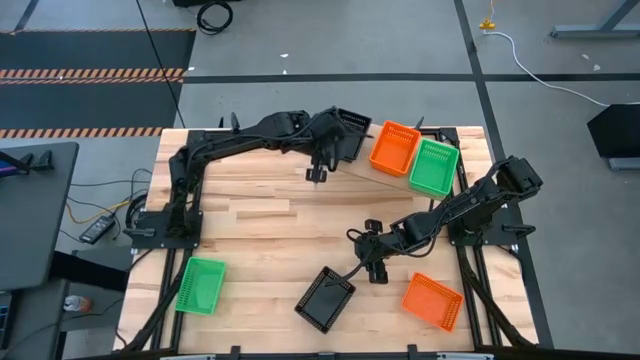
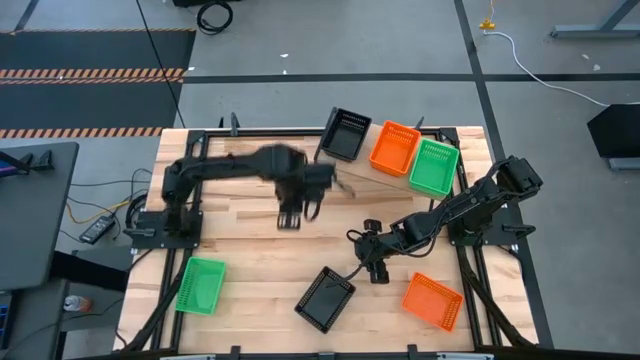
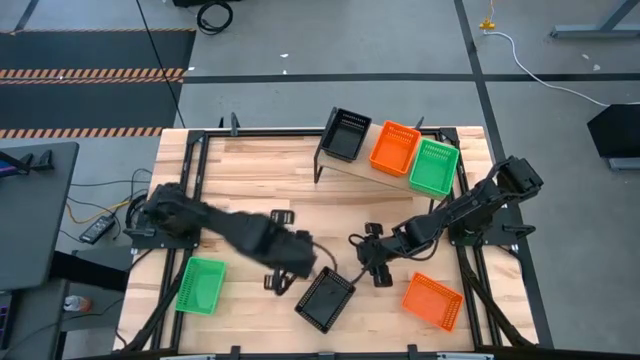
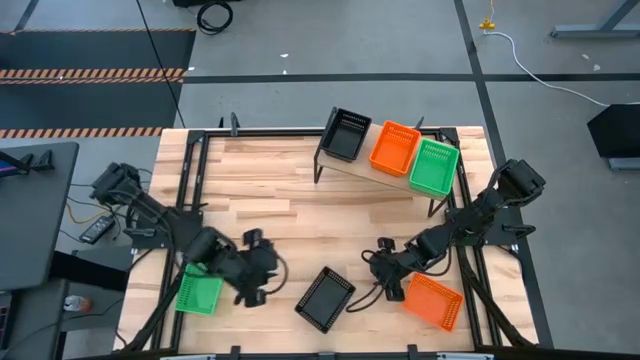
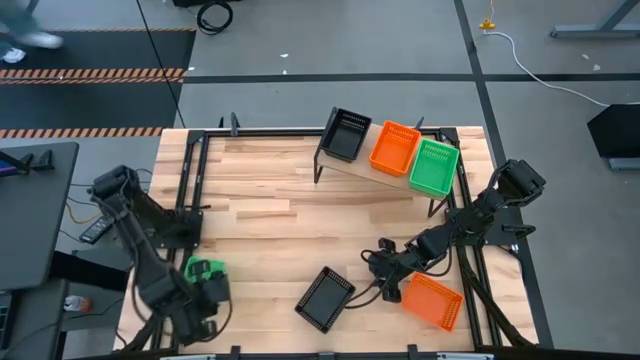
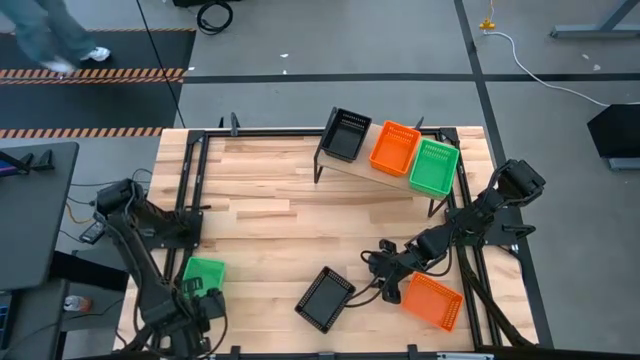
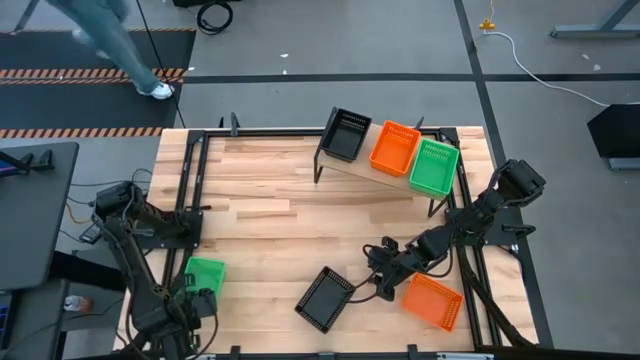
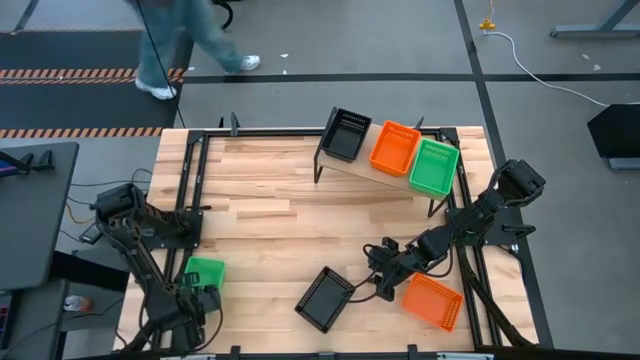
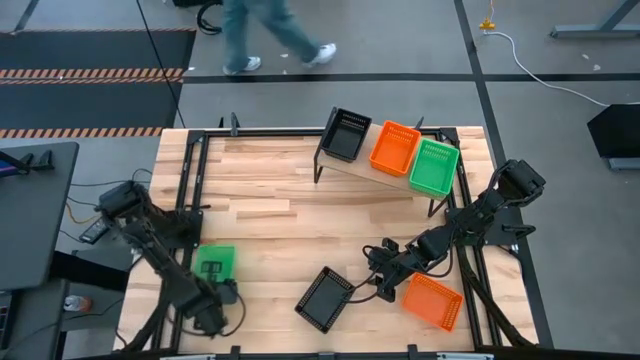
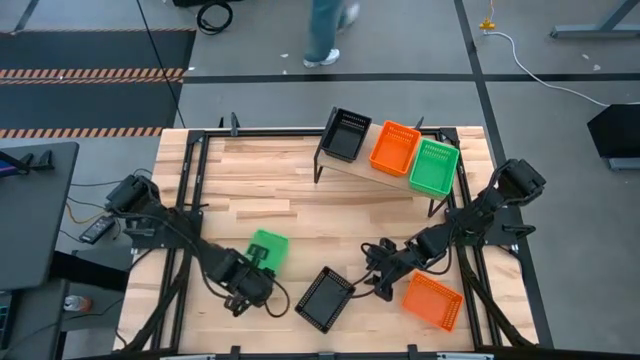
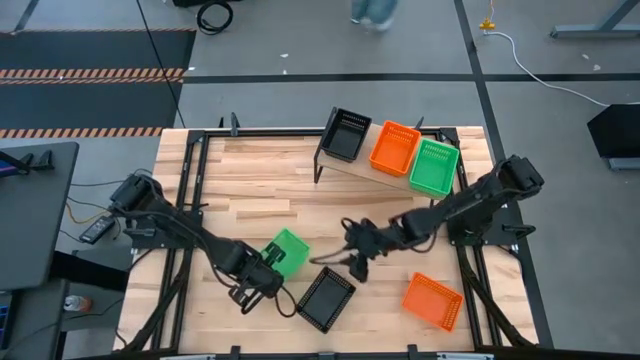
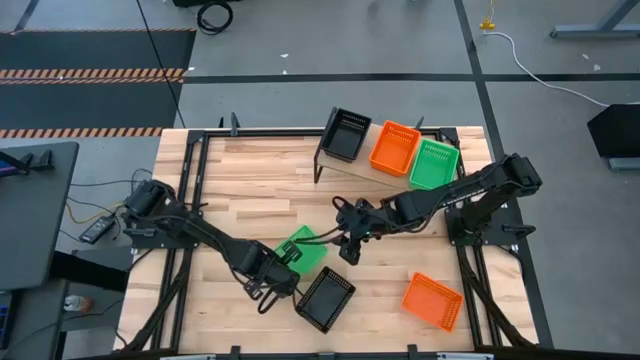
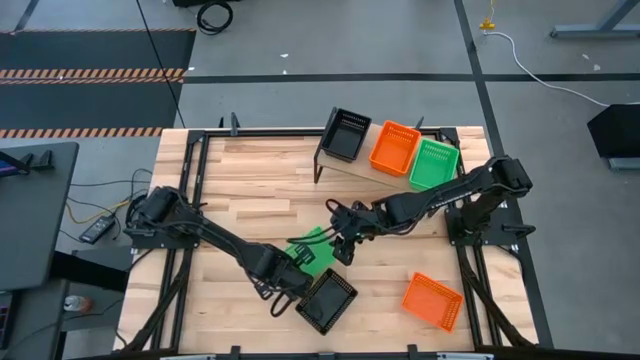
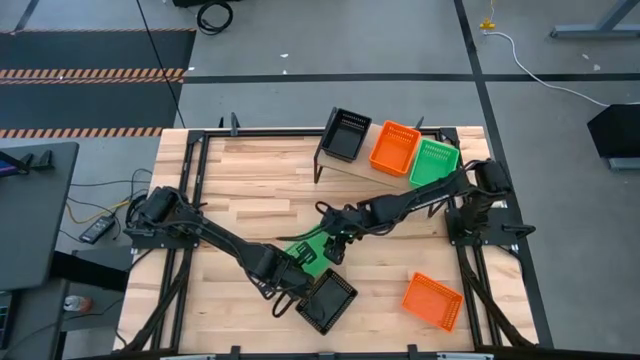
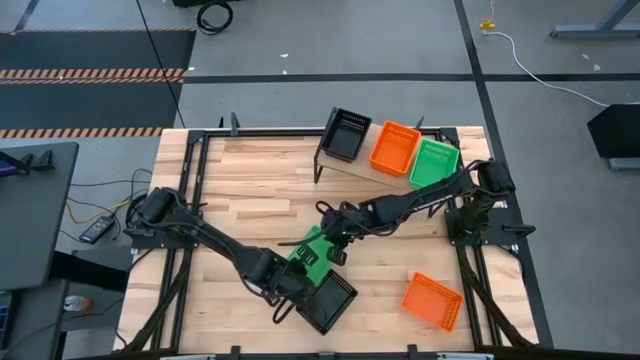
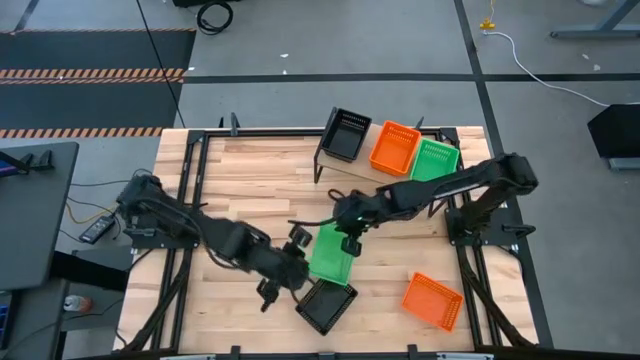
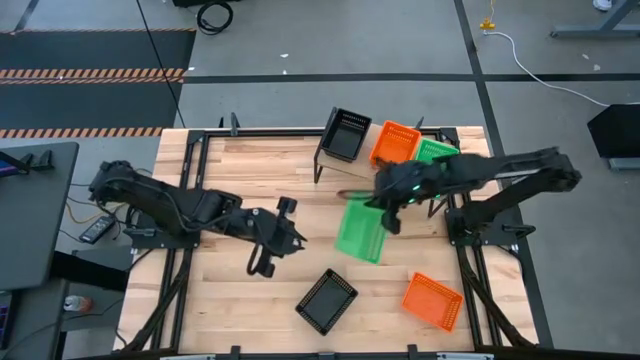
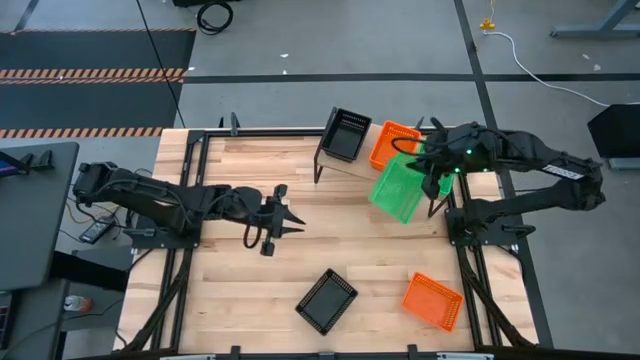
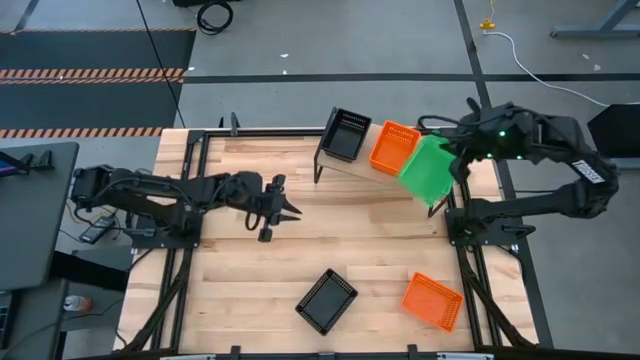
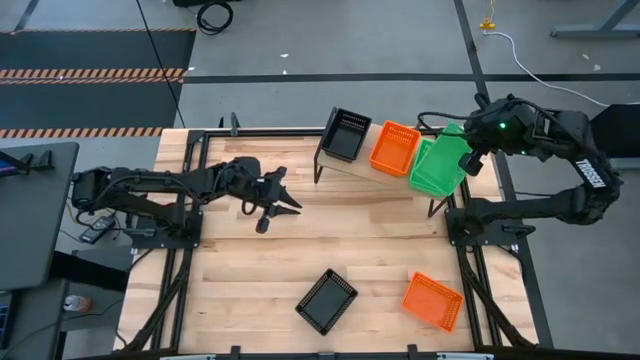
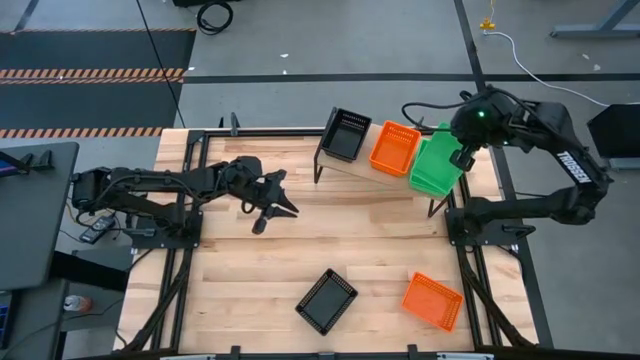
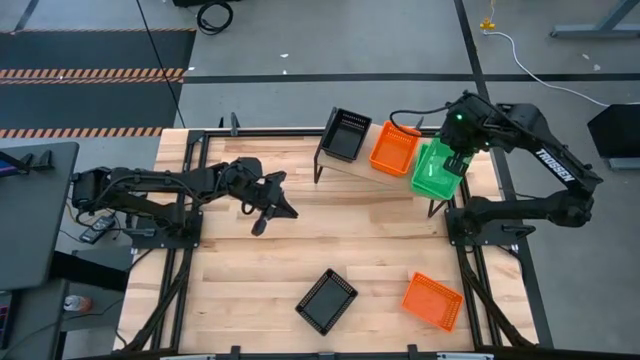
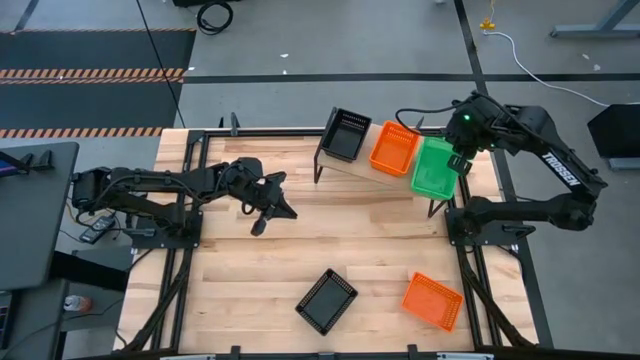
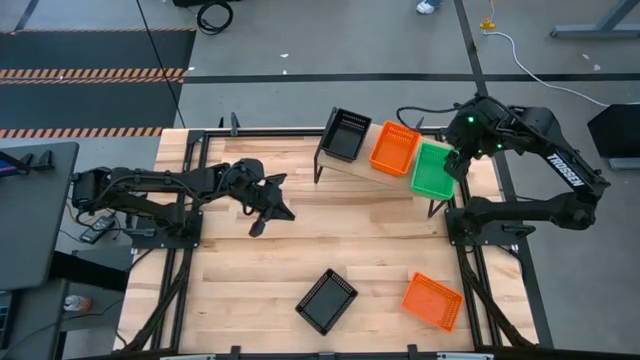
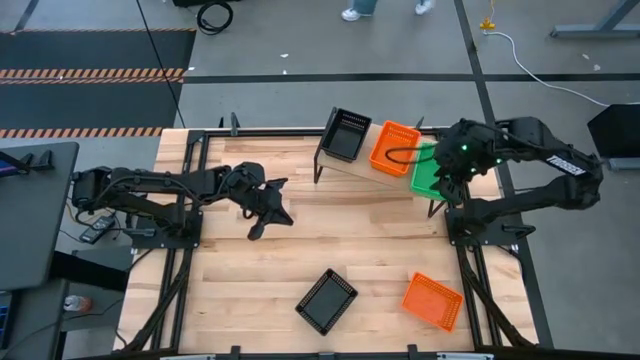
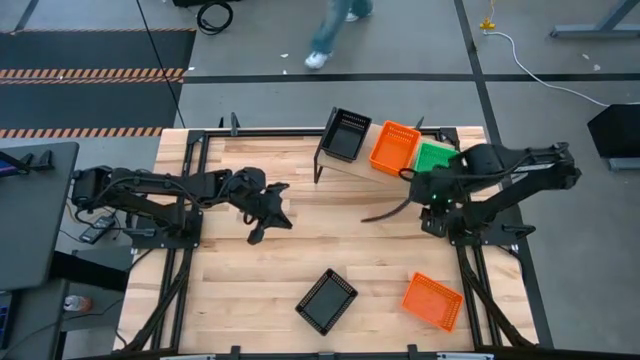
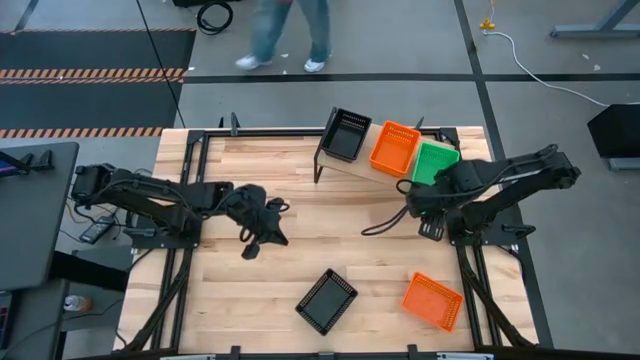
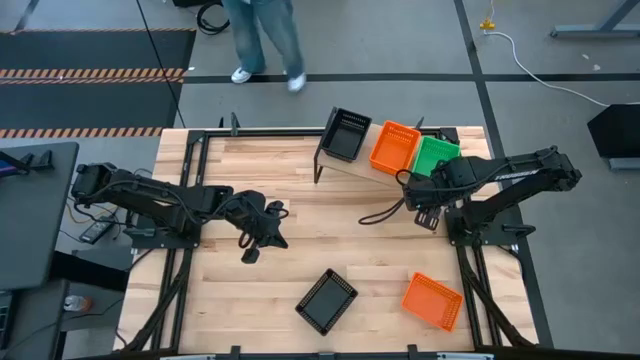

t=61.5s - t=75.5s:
Task: Stack baskets on shelf by color
Stack the green bin on top of the stacked green bins on the shelf

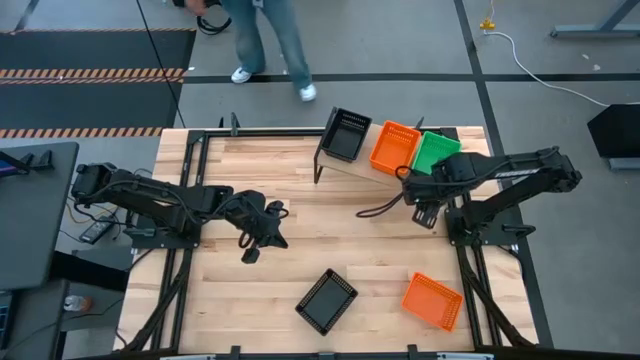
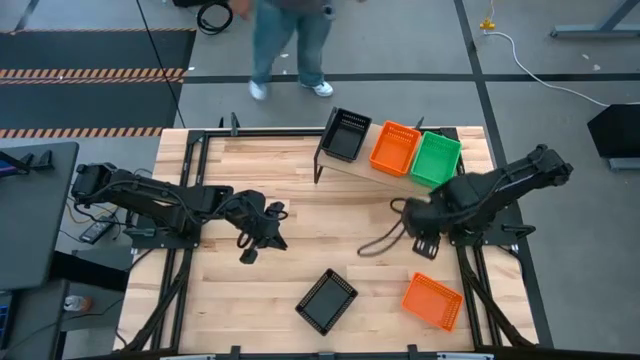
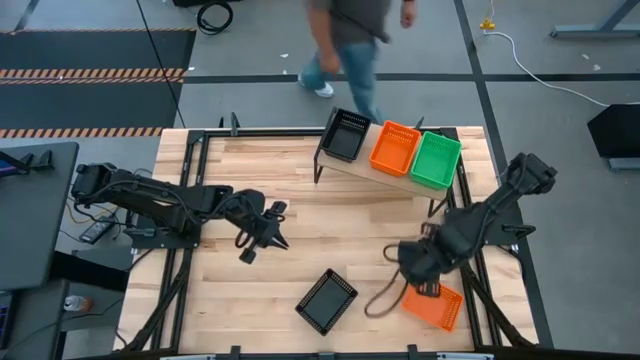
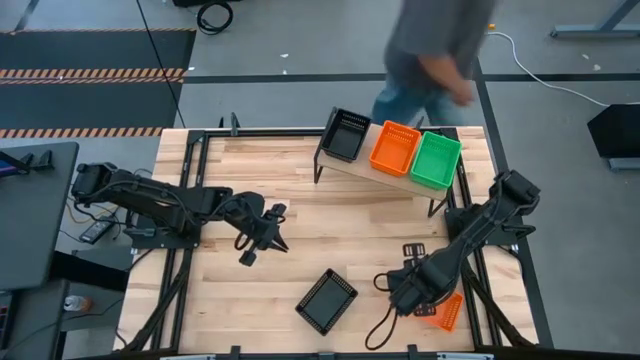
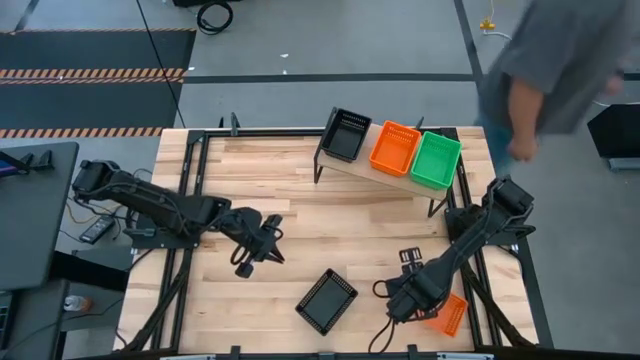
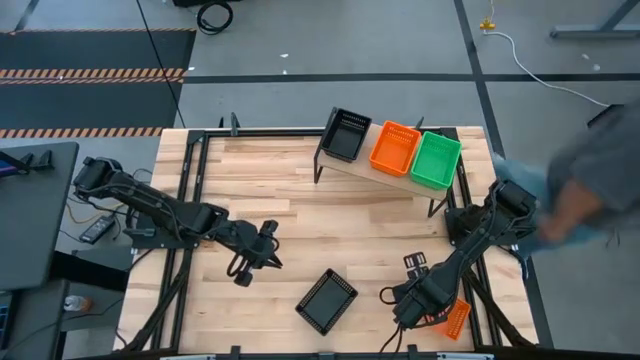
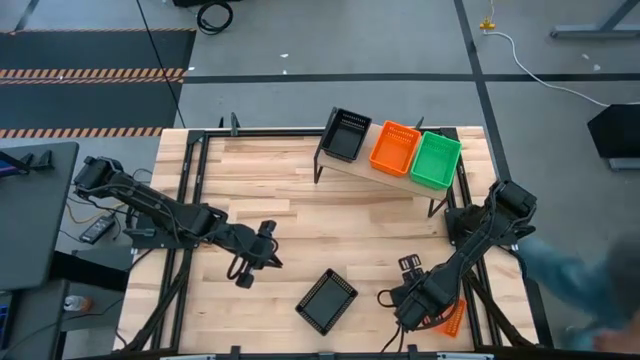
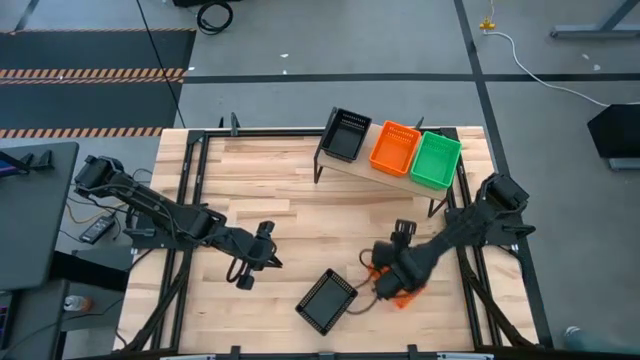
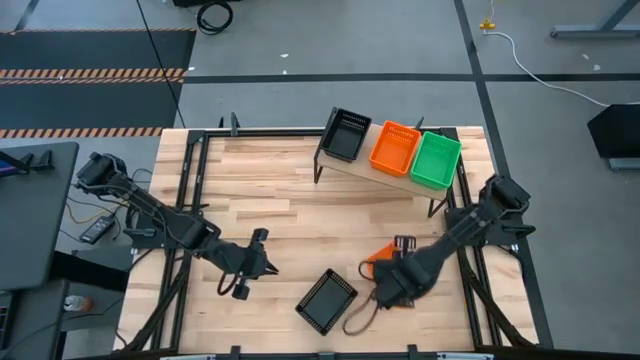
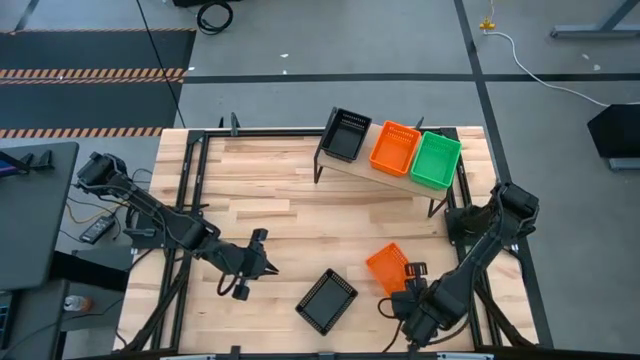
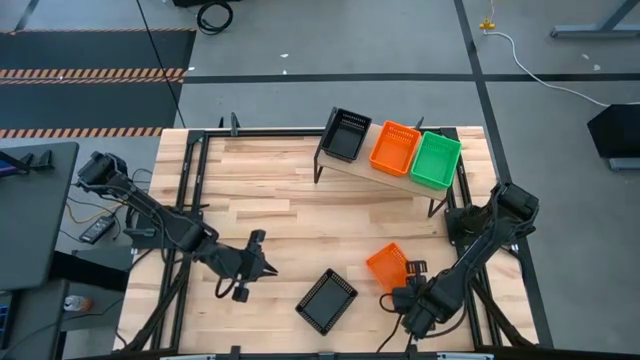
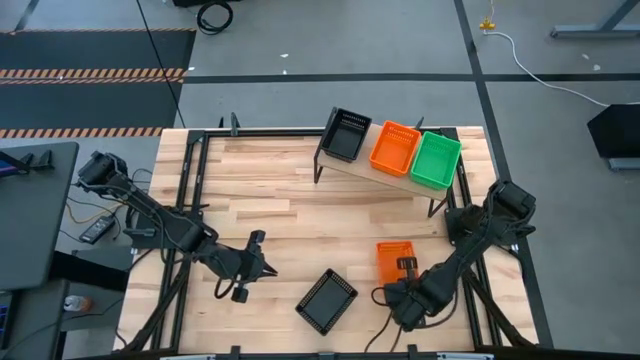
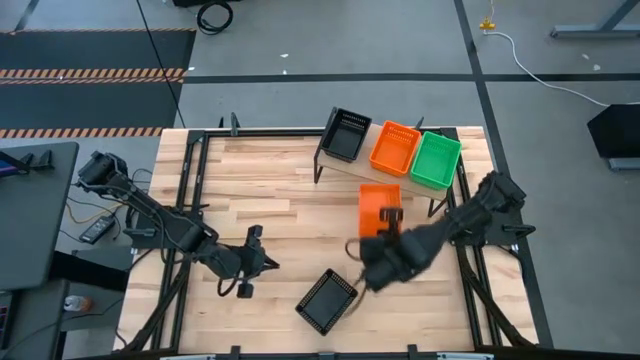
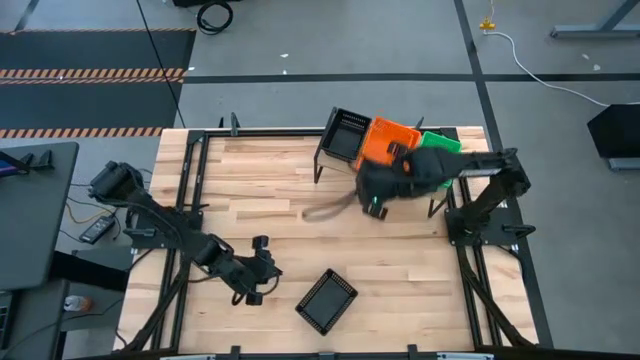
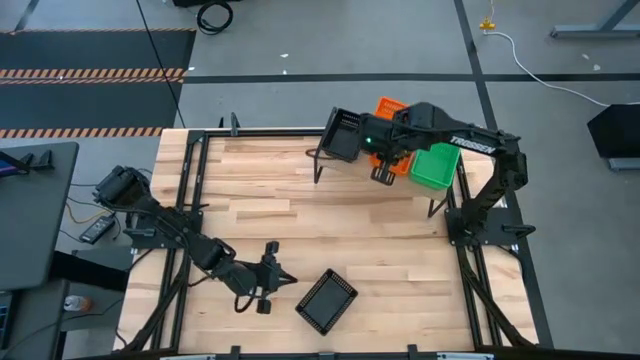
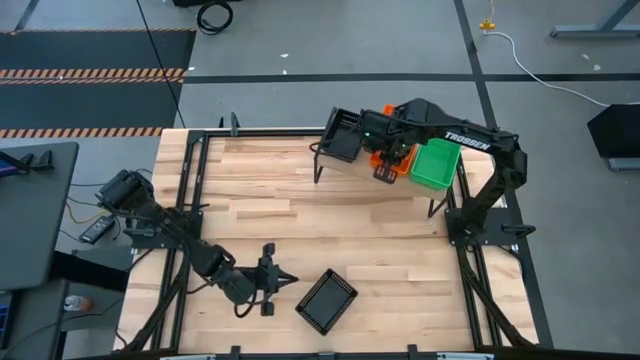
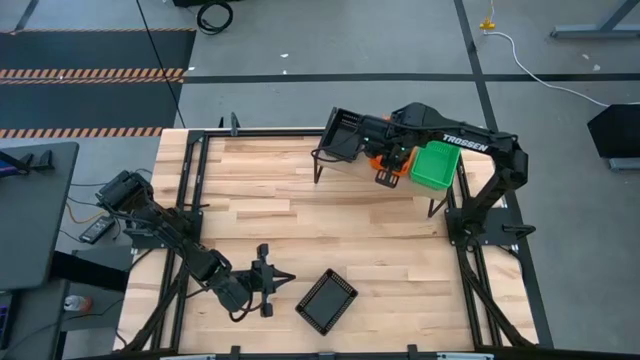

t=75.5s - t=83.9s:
Stack the orange bin on top of the stacked orange bins on the shelf
